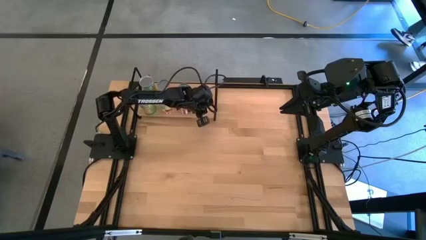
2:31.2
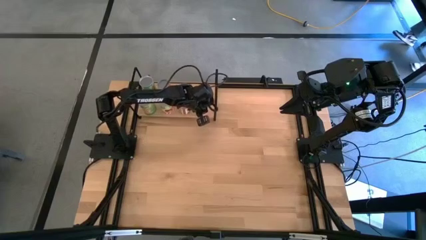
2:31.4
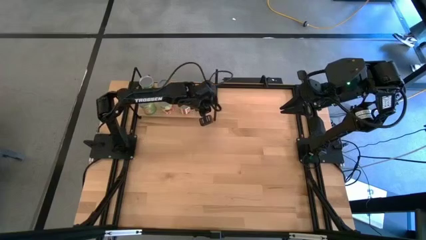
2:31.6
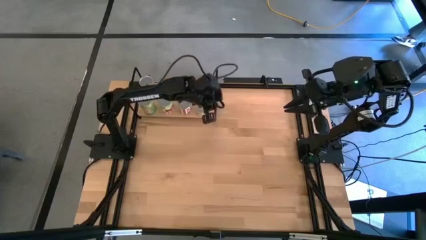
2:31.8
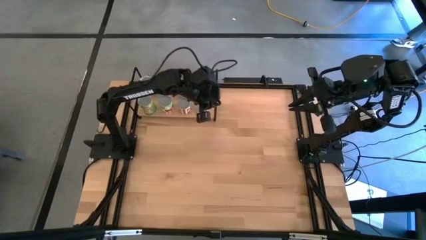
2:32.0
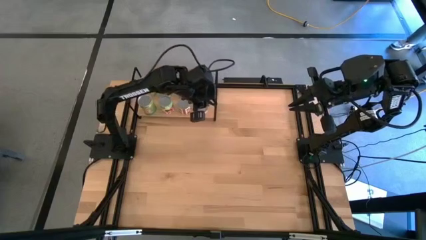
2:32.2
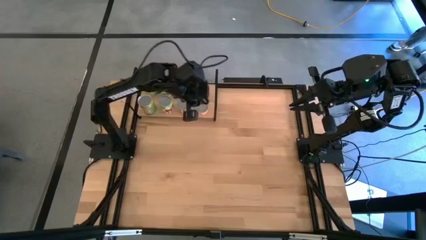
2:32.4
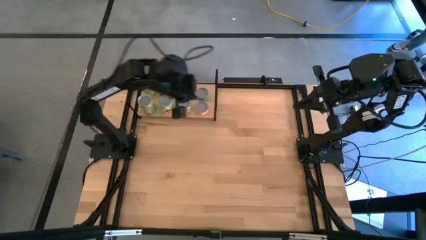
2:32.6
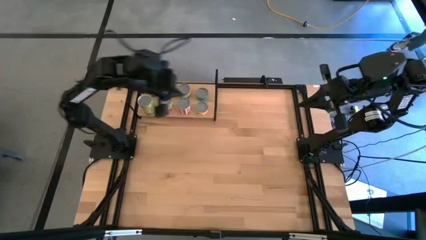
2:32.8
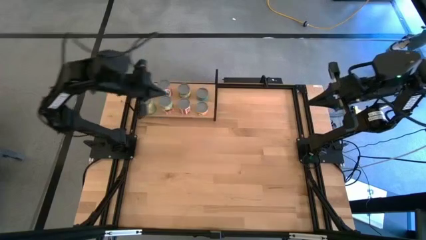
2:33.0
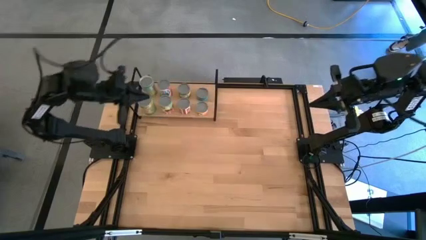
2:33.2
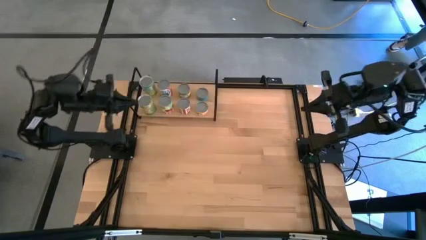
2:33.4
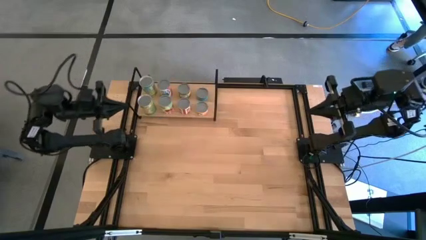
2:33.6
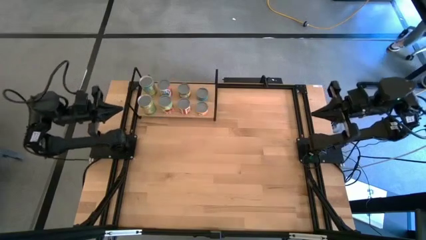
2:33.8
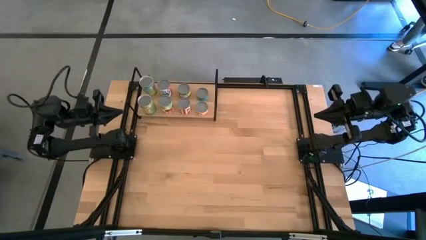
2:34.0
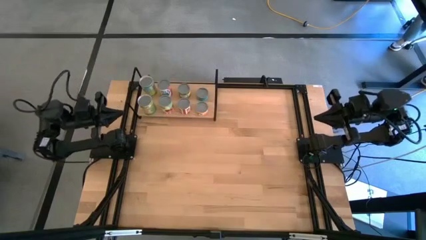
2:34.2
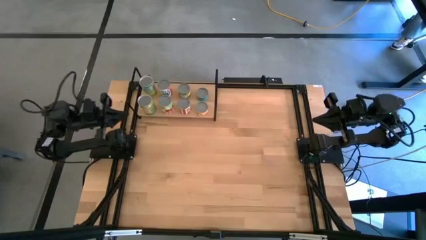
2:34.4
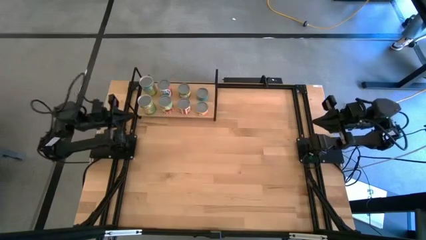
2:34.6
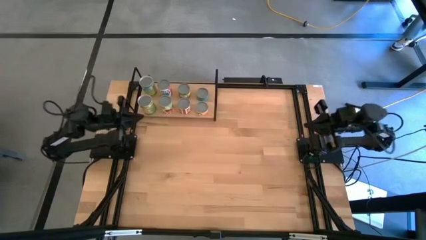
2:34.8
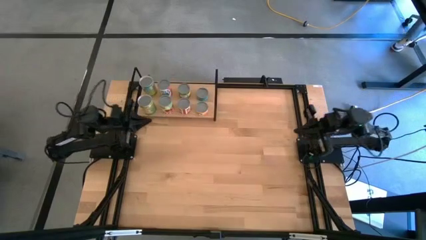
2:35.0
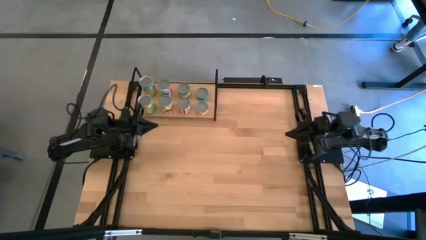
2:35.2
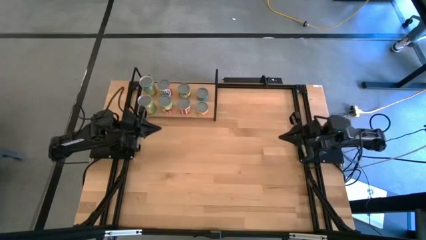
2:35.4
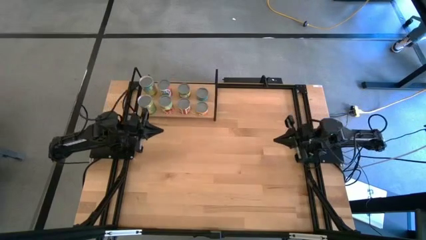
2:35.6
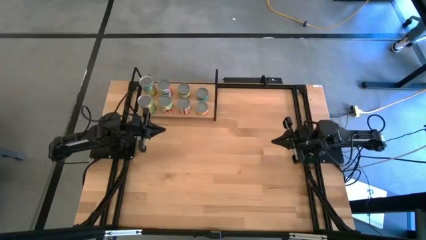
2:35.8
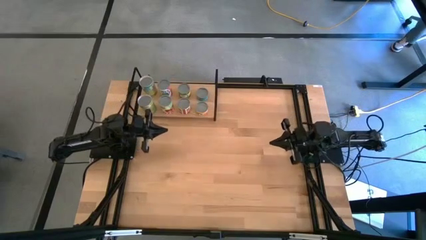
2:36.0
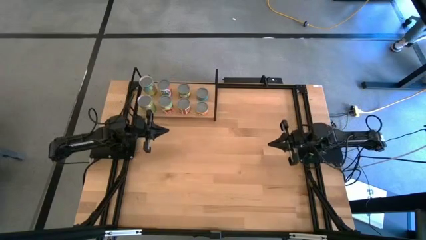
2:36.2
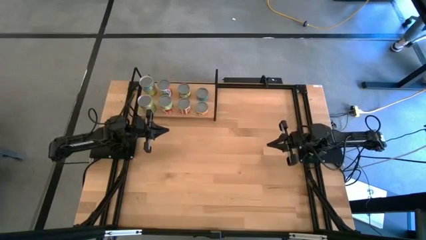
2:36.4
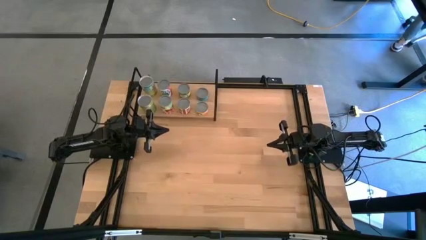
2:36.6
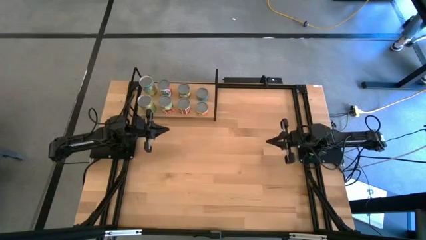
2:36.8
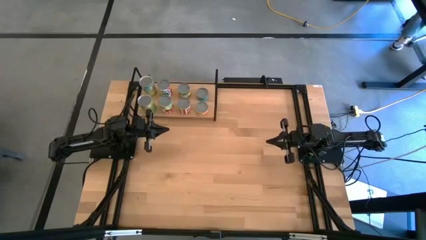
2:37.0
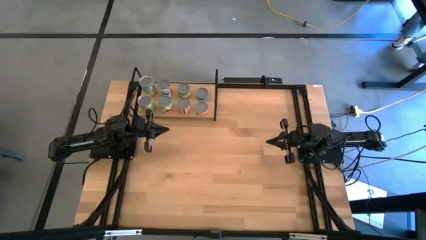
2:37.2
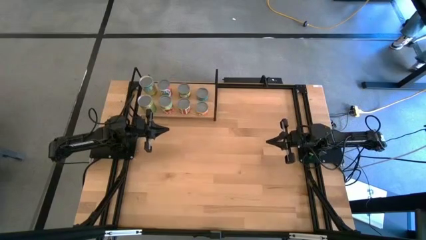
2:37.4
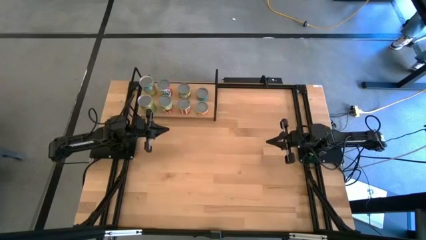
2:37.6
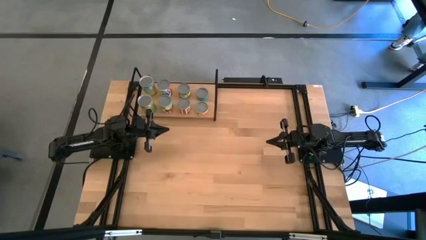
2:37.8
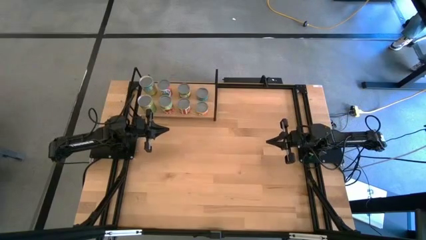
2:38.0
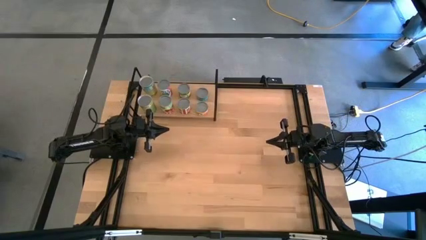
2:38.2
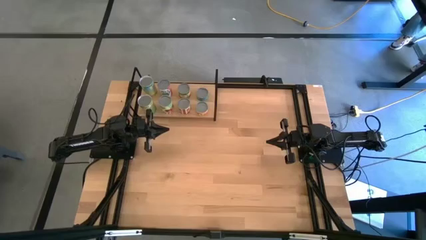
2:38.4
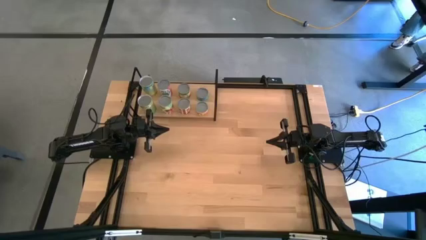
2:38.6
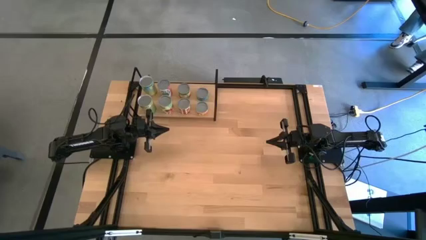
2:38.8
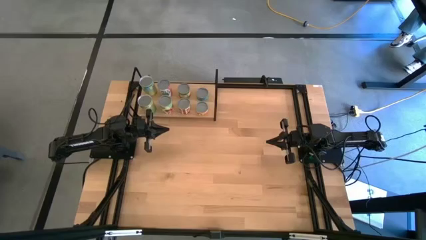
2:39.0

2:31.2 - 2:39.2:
Task: Pick and place cans onto a shelf
Return to Home Position

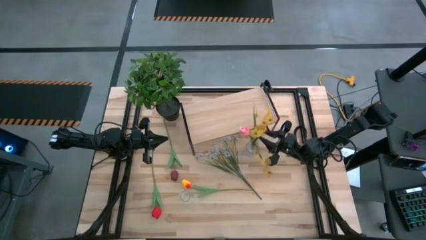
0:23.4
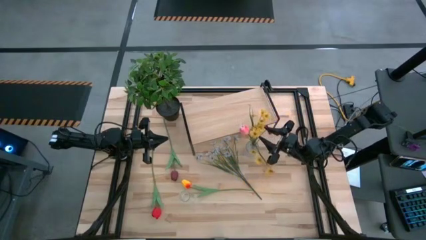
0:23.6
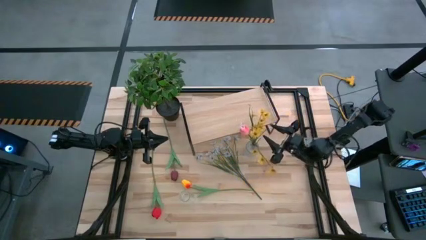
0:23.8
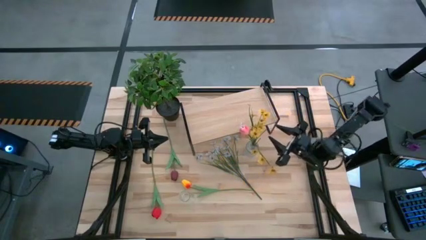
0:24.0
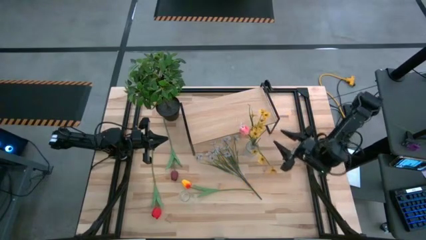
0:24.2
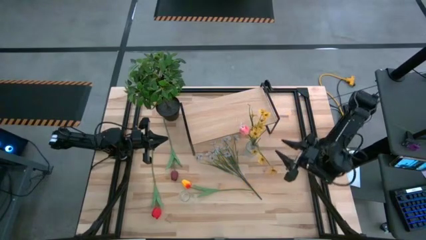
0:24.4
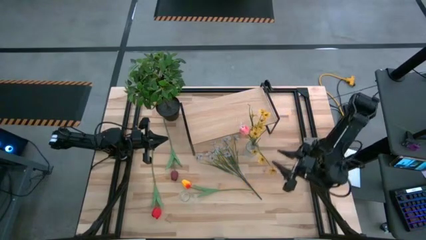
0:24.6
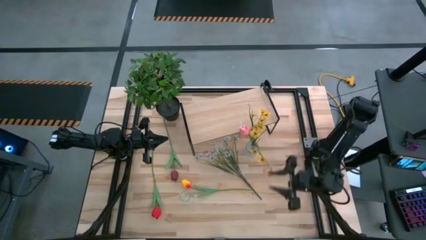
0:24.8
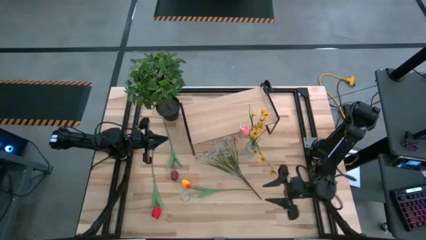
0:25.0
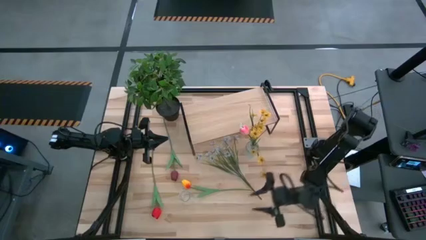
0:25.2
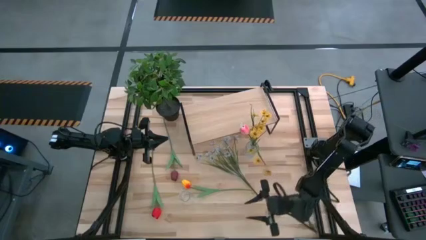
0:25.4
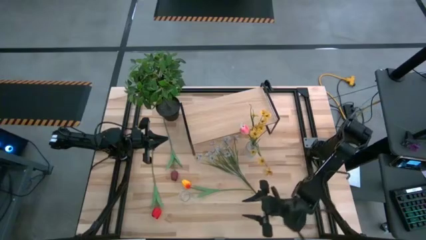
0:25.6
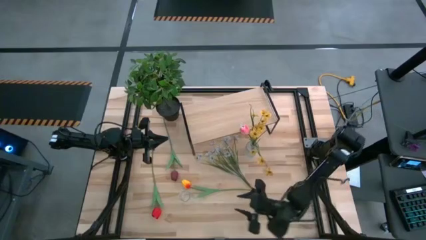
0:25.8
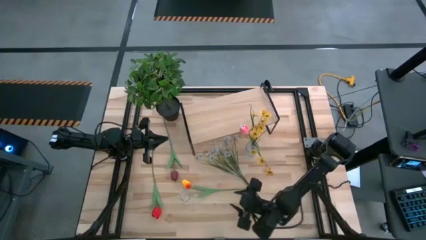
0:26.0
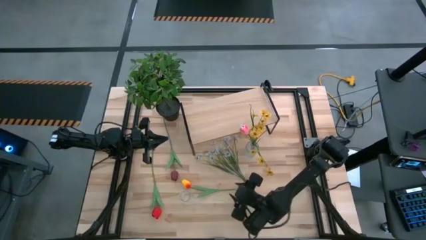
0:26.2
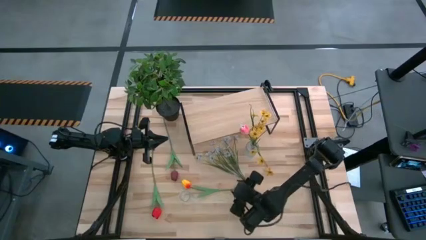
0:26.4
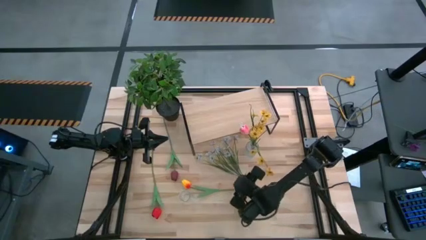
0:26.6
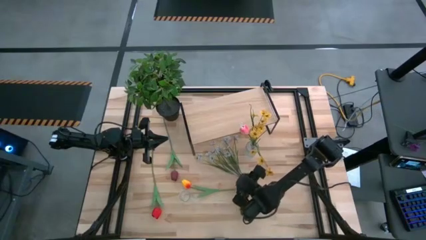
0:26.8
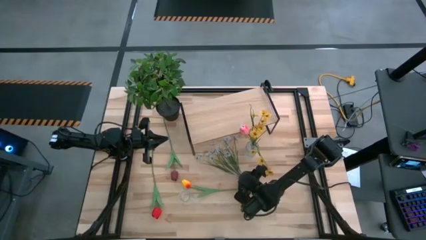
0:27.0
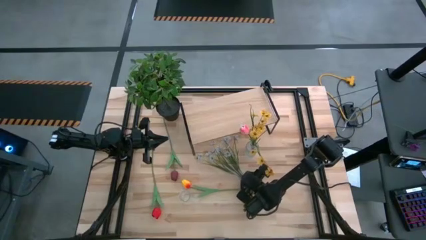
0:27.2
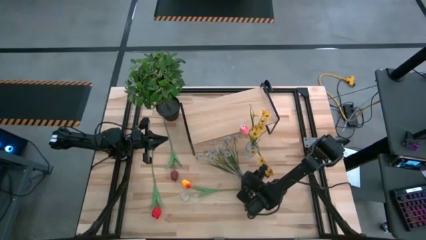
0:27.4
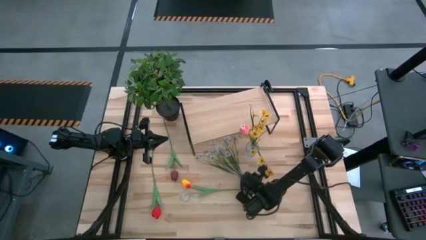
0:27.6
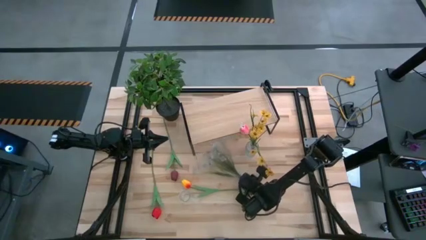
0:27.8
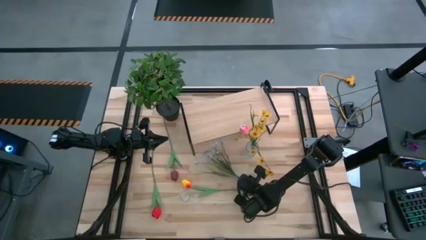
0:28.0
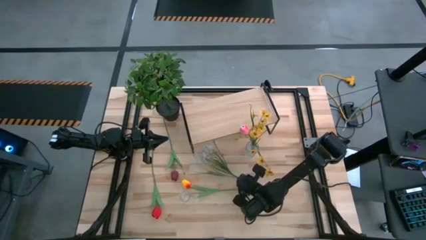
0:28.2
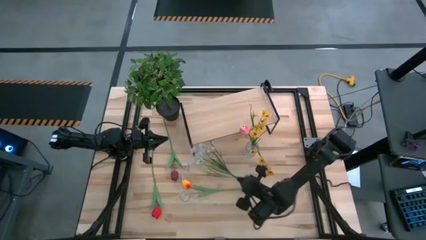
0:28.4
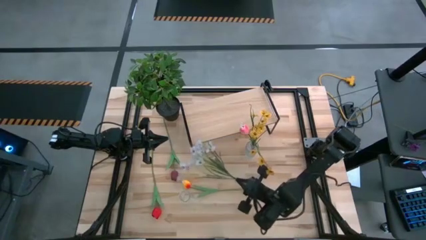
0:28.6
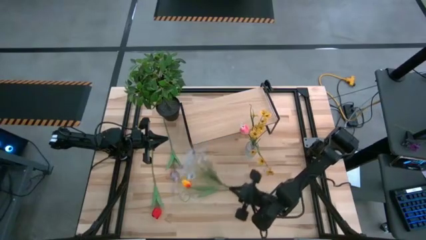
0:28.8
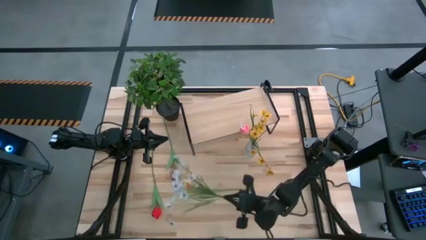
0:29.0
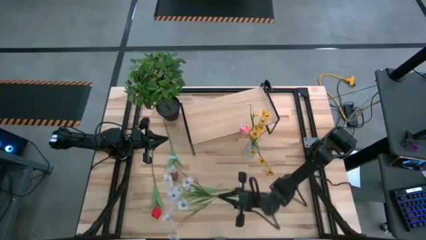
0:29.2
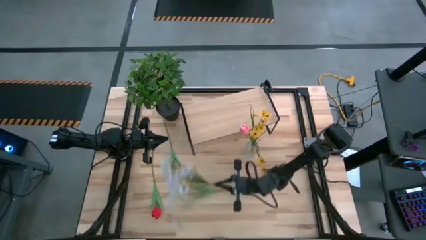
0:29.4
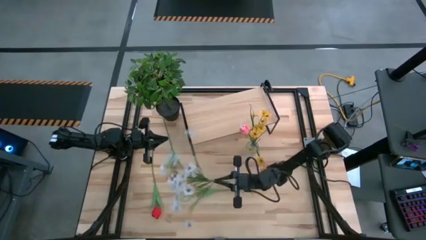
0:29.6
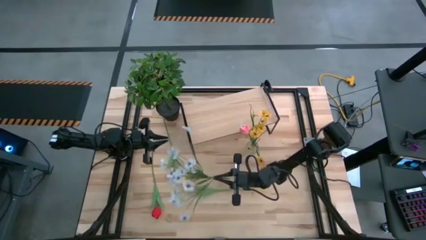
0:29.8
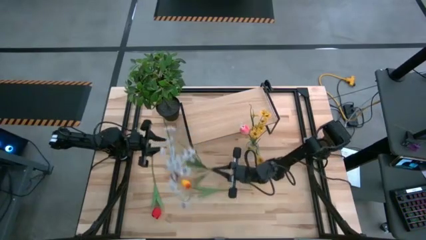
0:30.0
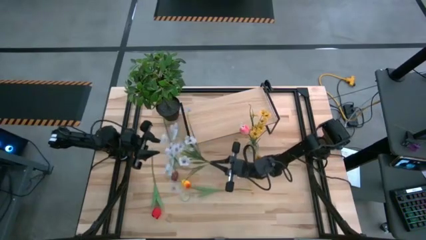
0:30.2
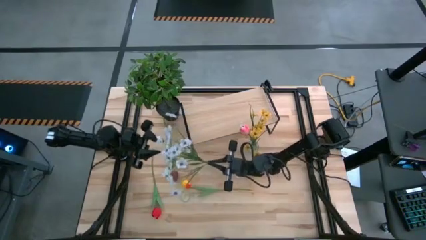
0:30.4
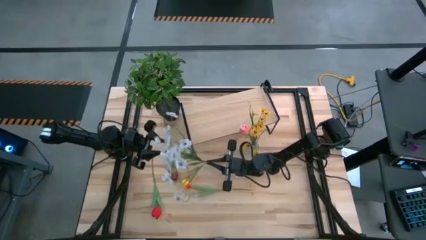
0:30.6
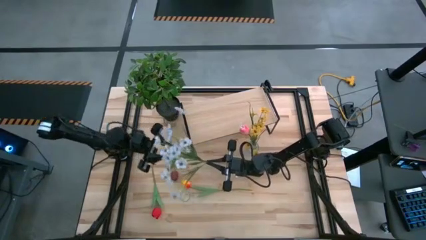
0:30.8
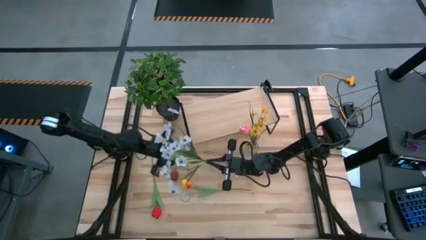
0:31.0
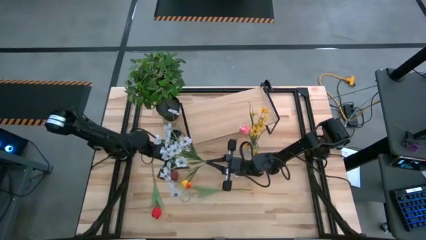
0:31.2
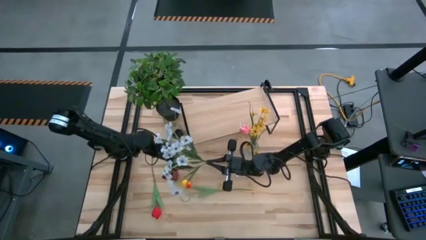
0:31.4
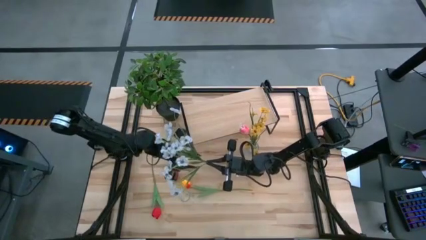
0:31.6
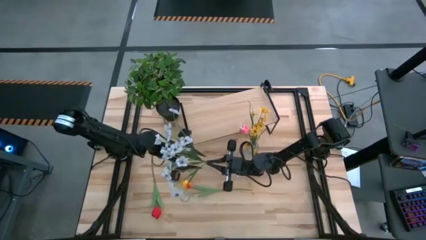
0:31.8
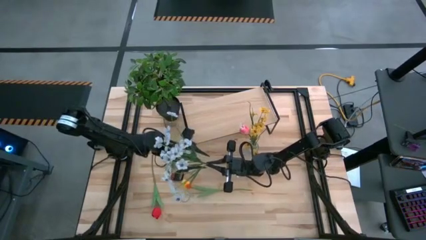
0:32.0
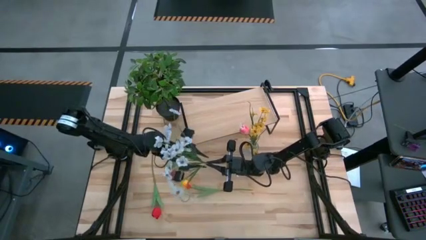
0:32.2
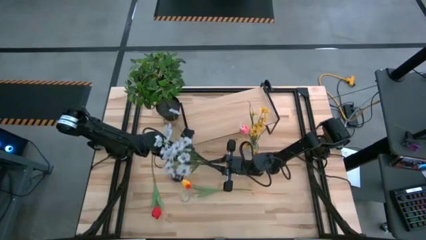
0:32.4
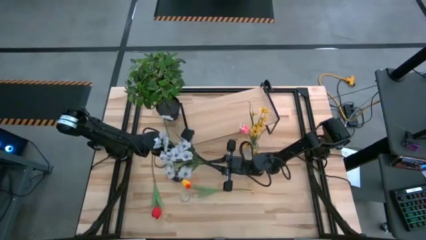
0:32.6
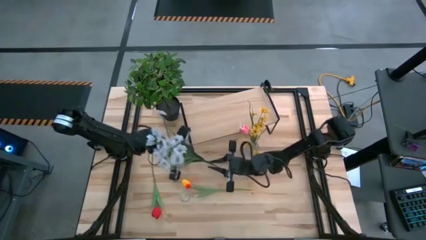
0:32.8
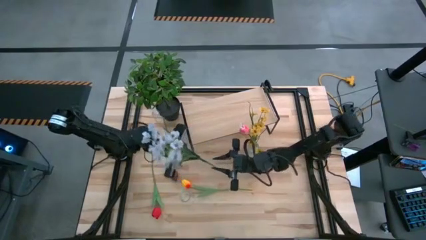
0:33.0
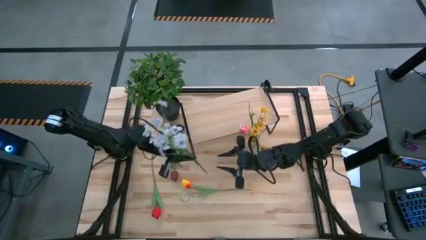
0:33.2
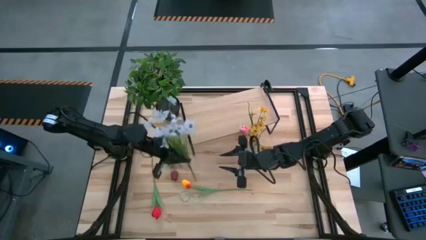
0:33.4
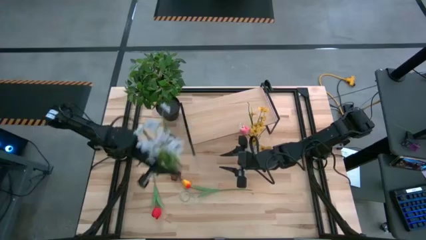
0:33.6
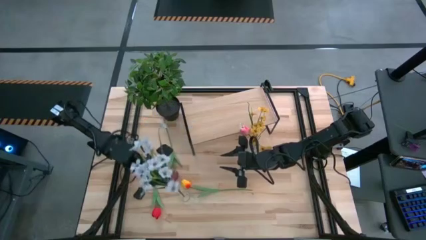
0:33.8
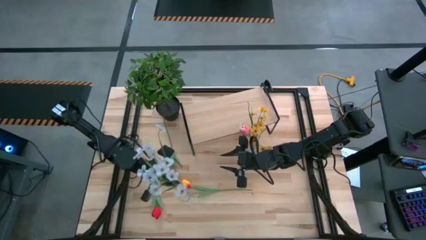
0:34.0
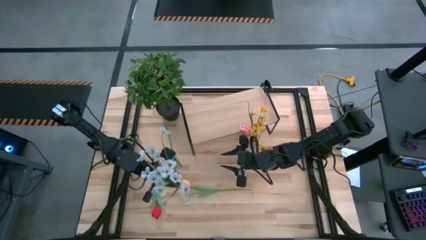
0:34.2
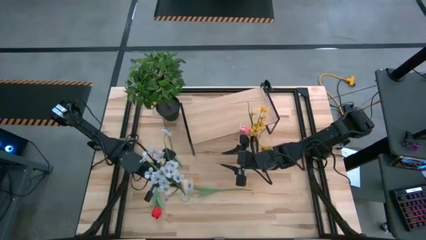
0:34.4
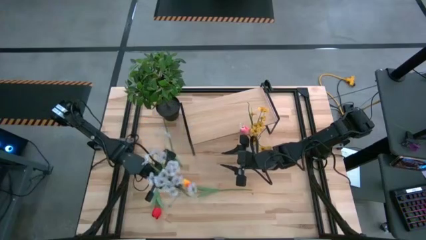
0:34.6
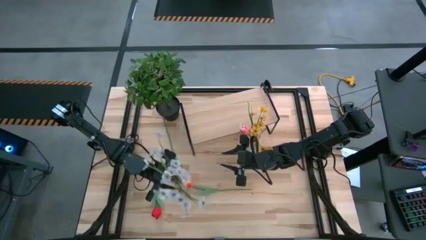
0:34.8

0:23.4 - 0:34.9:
Task: Pick and place flowers into a vace then onto a shelf
Put the white flowers into the bottom transparent vase
